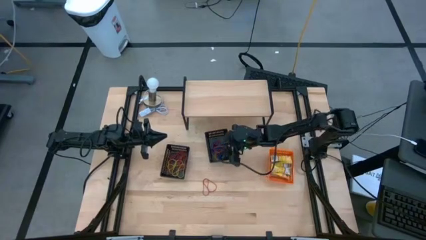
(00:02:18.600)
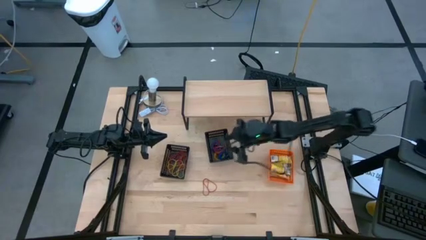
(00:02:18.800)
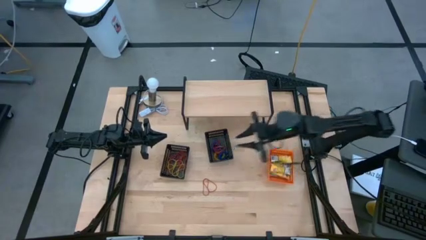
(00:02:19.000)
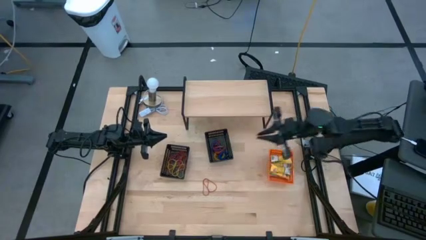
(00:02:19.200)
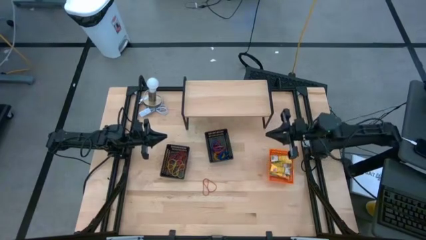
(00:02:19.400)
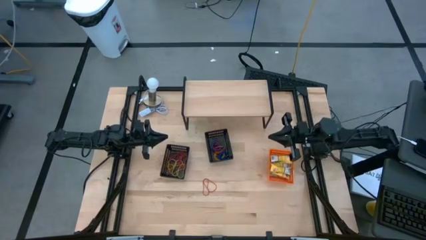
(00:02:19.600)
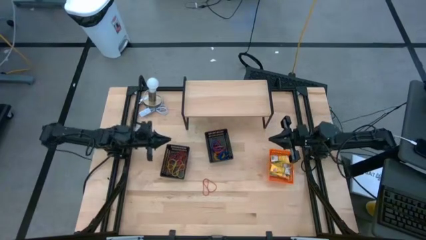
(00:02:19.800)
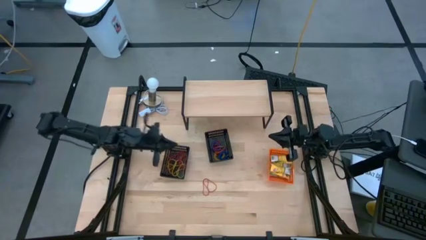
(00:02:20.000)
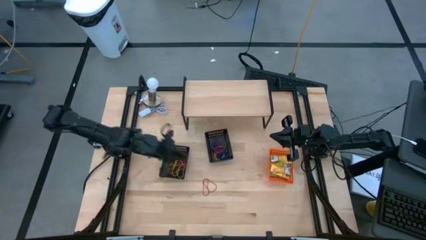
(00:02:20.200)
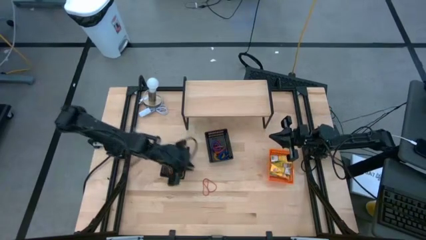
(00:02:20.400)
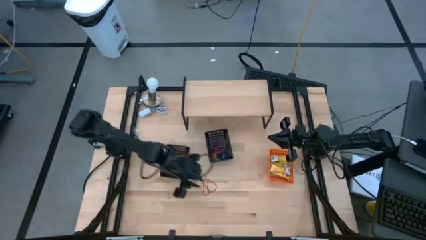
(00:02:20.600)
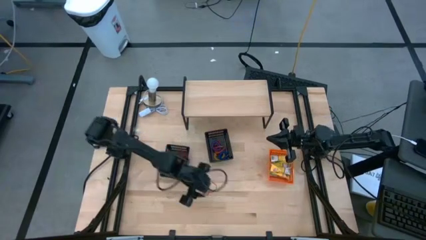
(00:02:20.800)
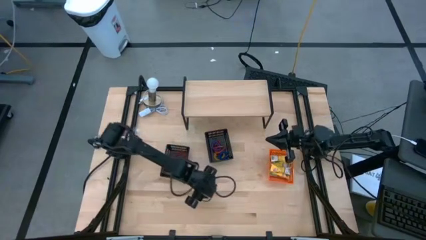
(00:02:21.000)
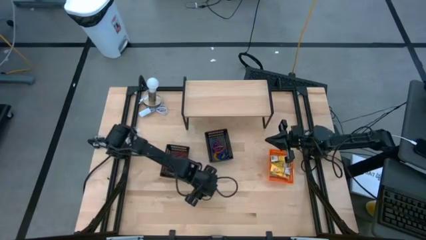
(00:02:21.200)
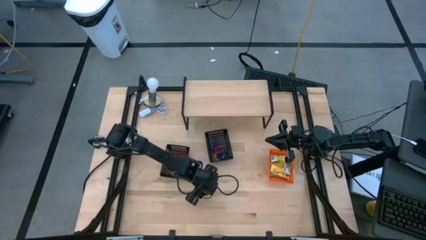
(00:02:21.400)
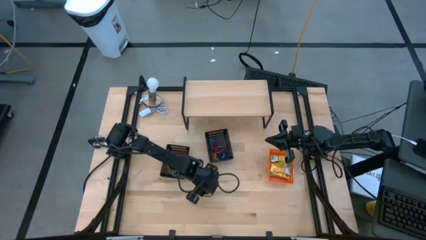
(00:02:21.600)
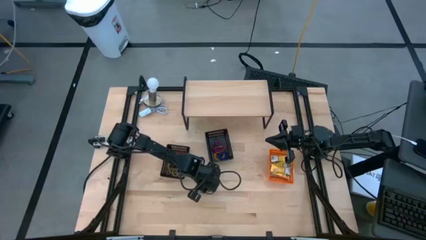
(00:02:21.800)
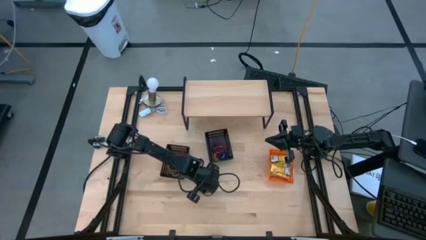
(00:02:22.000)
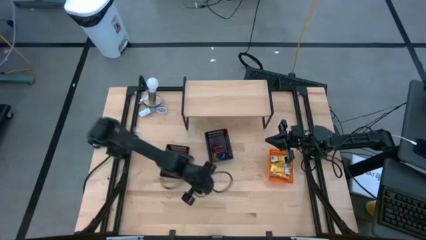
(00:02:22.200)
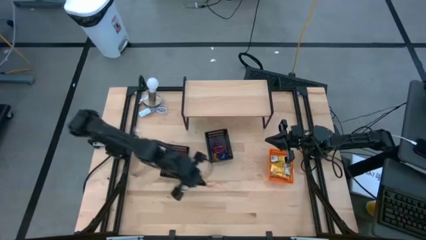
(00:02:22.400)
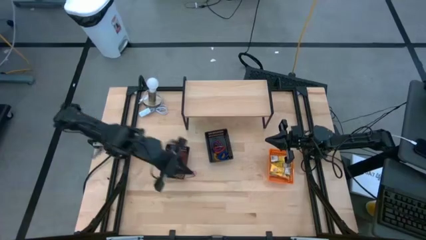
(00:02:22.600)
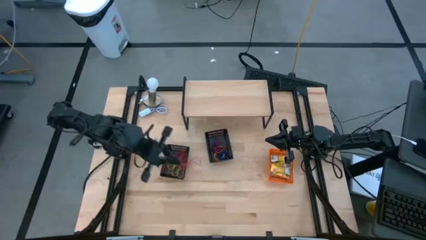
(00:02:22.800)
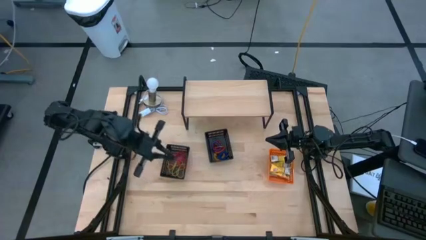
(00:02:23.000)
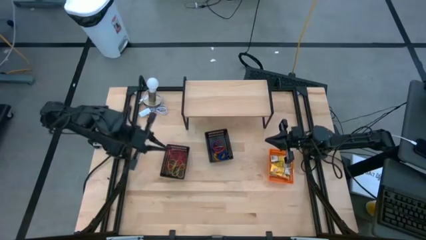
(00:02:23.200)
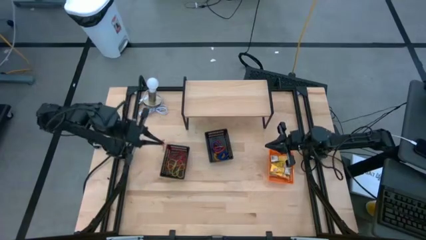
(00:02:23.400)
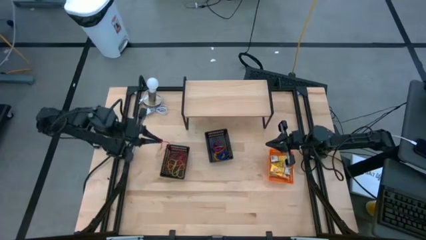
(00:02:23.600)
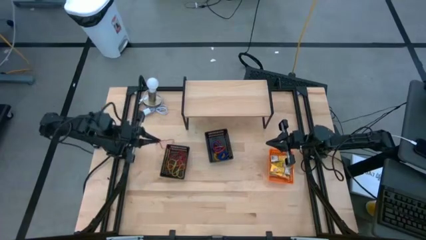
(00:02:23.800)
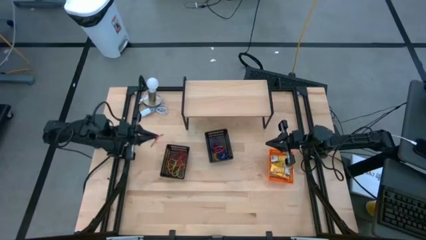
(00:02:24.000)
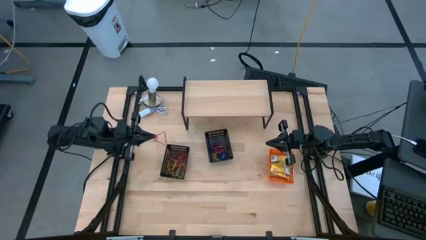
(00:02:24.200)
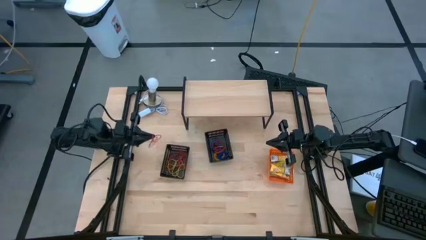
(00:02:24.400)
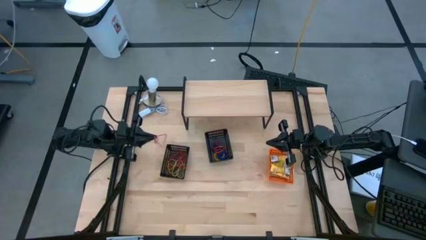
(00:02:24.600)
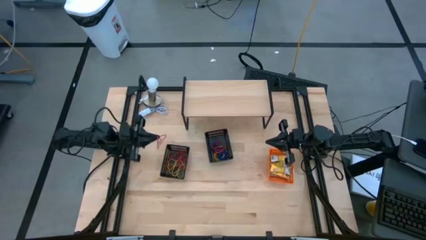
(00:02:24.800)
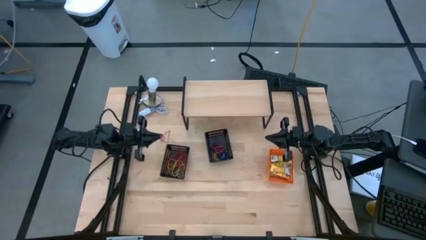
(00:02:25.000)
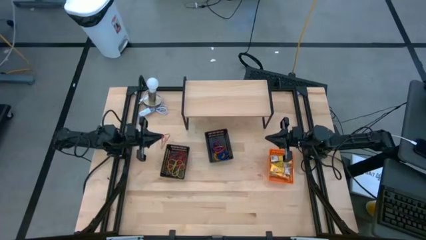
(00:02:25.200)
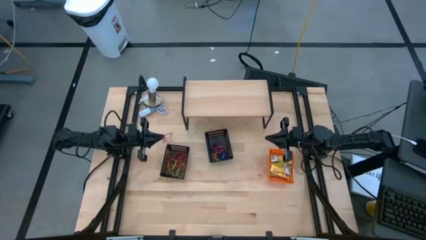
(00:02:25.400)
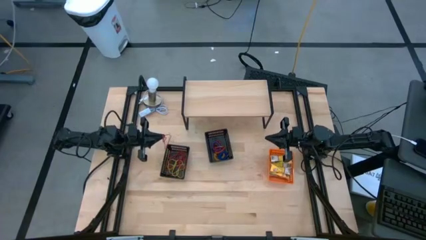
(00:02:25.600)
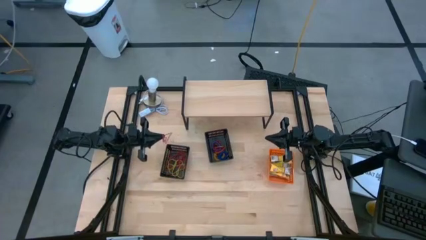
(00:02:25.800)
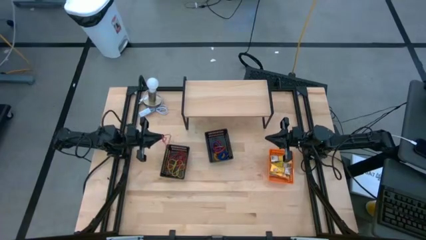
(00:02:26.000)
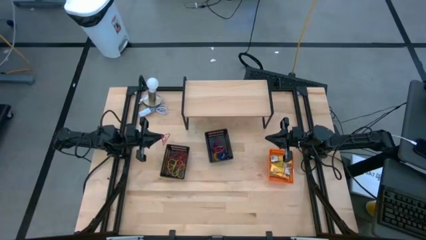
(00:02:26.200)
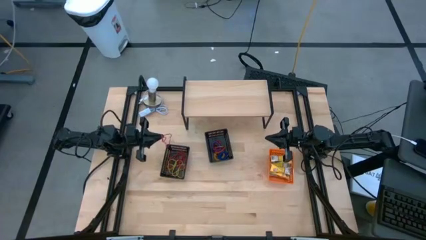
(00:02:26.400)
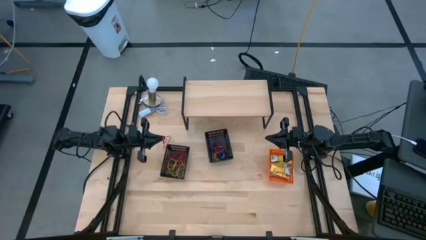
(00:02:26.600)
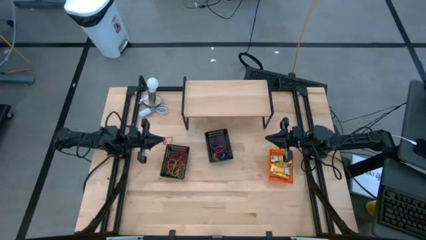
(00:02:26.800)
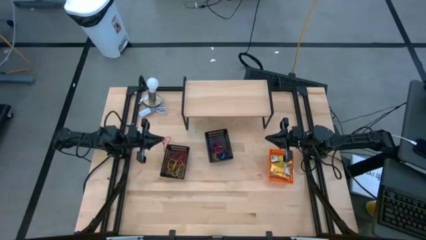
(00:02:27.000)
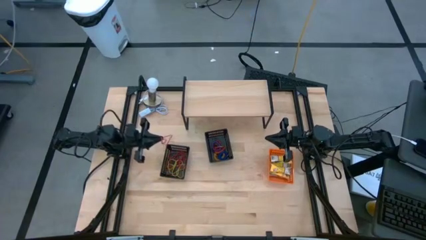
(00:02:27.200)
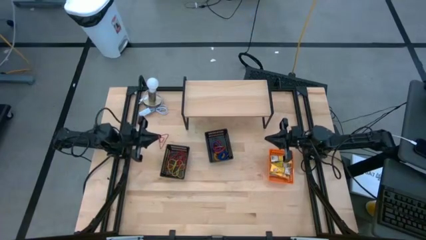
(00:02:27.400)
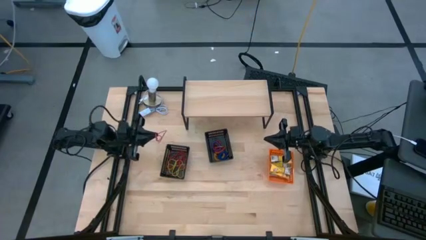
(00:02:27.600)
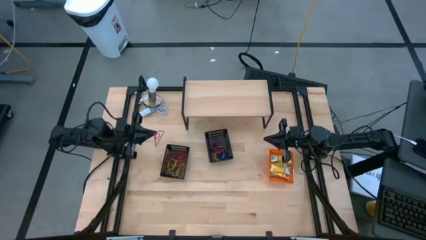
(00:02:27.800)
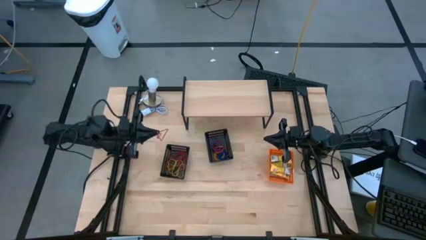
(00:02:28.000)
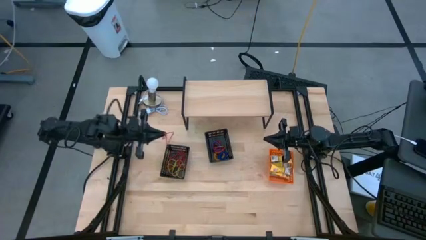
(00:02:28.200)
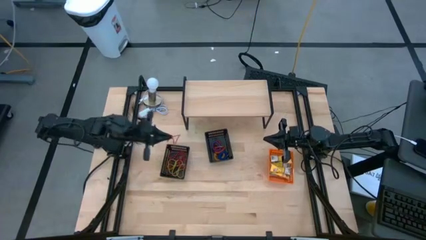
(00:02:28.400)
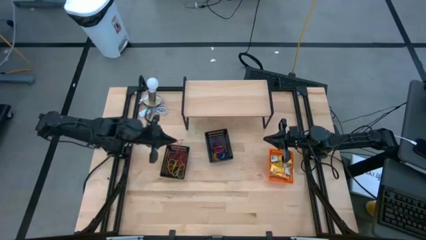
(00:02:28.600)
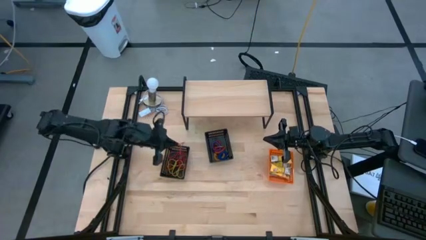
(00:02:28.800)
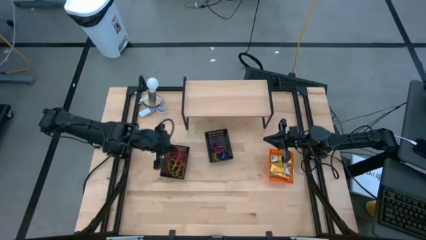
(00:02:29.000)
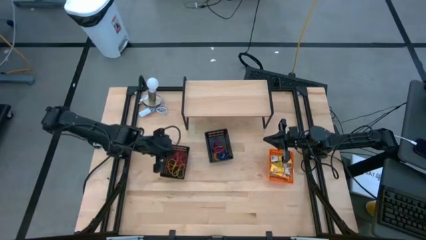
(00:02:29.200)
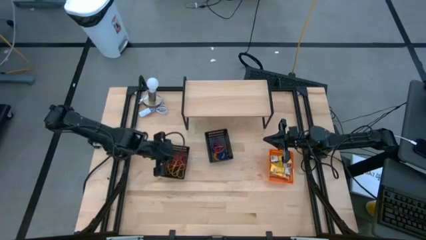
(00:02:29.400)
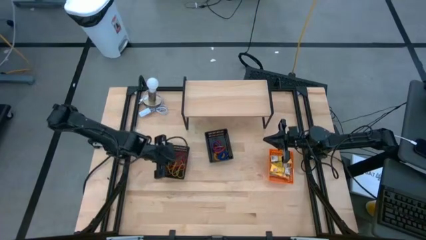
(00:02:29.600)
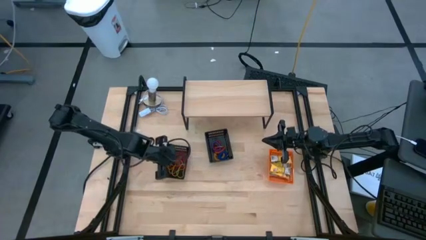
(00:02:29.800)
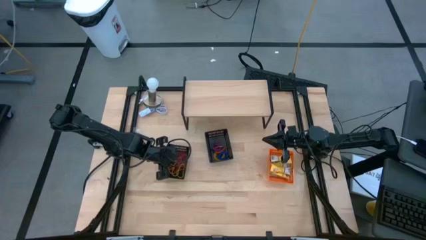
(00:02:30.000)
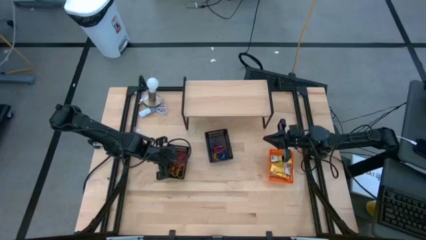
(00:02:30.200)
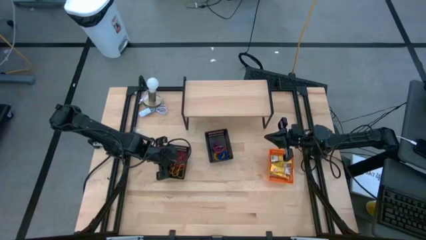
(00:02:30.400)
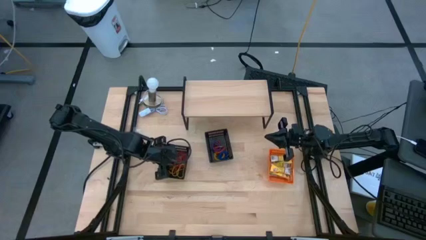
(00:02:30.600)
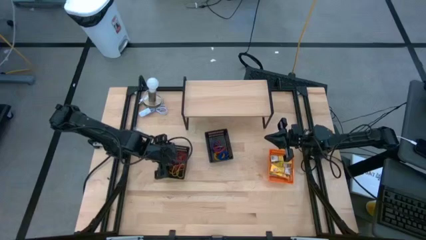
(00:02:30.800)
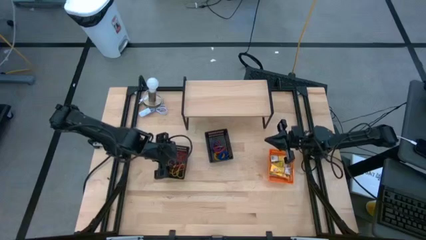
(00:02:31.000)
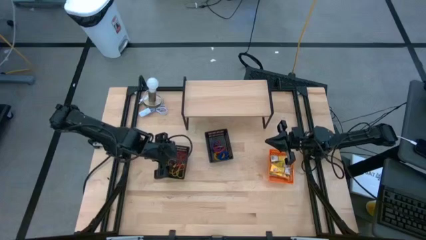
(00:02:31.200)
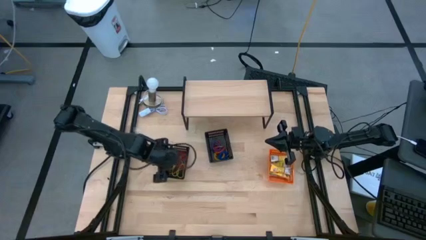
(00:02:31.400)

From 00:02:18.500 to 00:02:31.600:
Task: Pick & Place Office Desk Supplies
Put the red rubber band into the left black bin

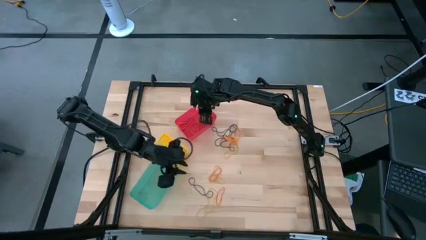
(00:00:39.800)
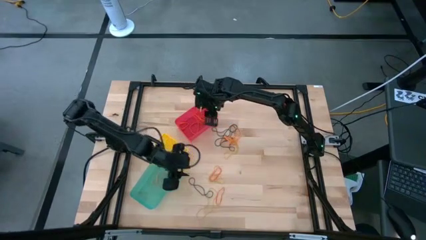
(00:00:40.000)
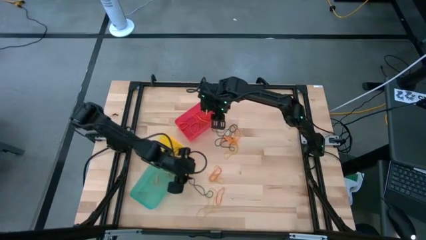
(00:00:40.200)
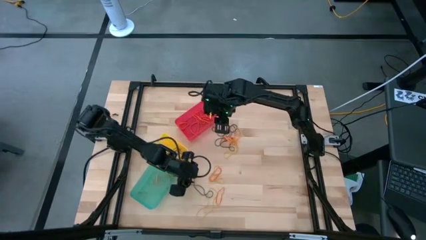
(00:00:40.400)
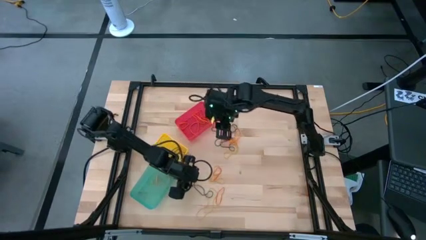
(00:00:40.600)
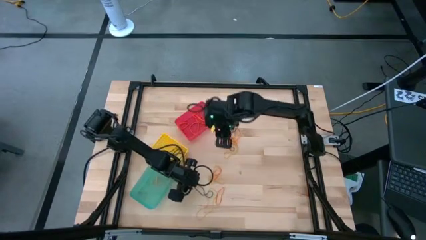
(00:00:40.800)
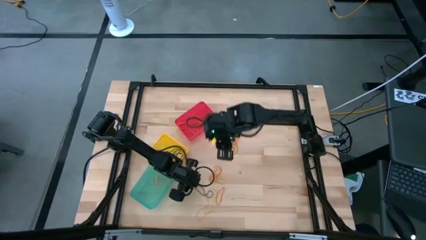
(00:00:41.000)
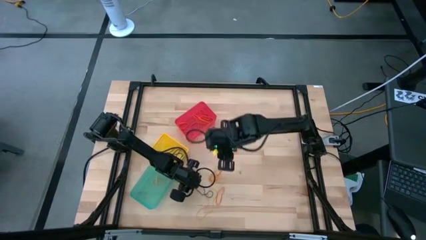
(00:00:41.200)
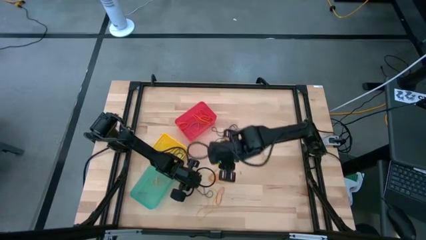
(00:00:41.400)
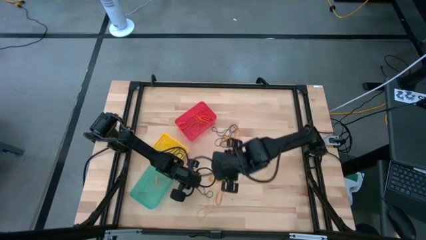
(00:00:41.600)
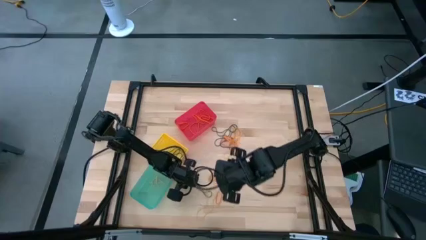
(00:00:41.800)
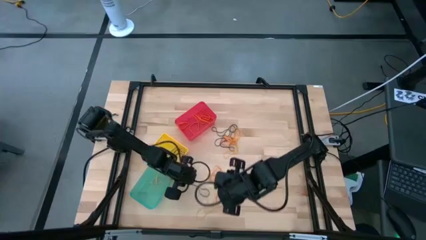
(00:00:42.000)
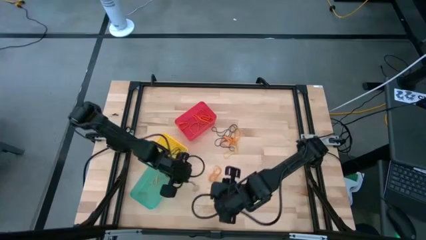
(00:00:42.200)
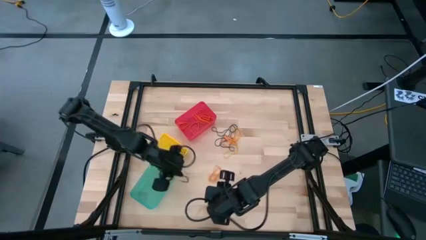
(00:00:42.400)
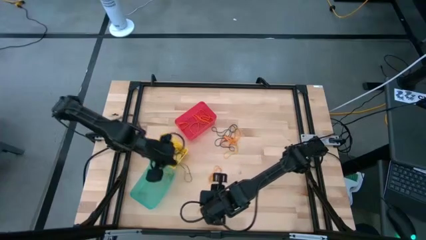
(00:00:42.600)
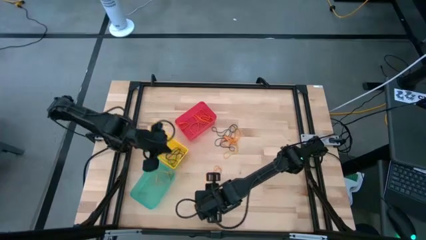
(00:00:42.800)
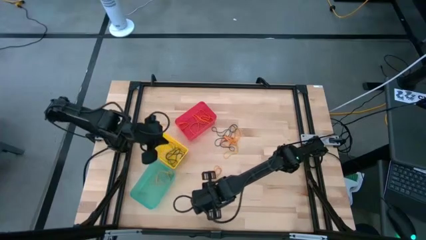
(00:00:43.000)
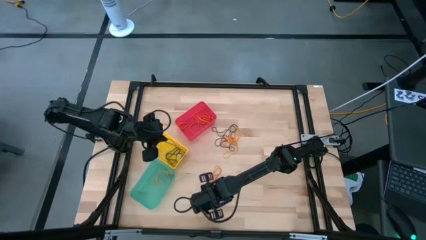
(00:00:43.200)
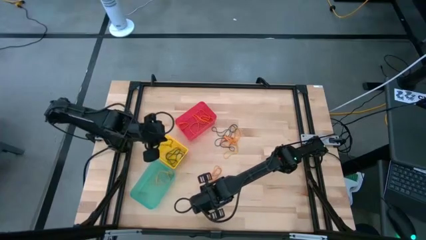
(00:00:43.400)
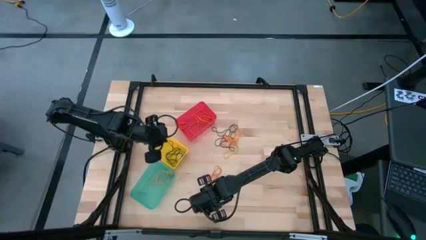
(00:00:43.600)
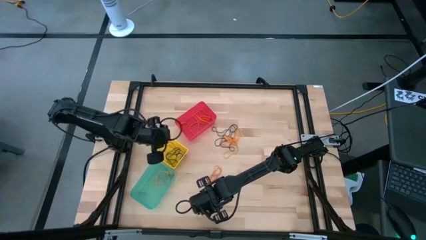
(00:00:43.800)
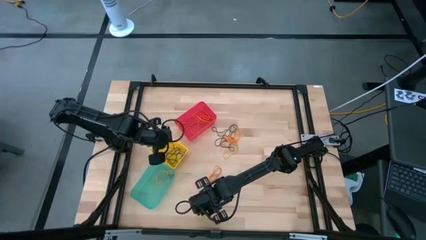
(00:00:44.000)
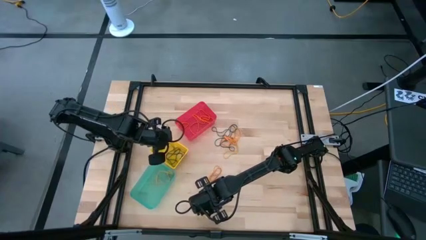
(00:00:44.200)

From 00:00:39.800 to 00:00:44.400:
Task: Sort rubber bands into baskets
Put the black rubber band into the yellow bin
